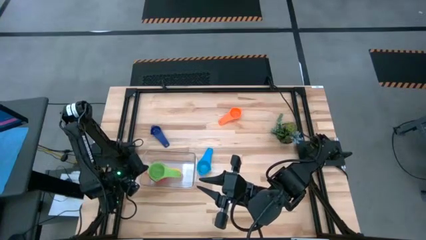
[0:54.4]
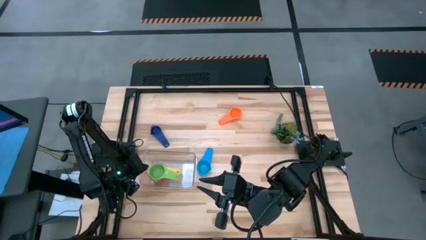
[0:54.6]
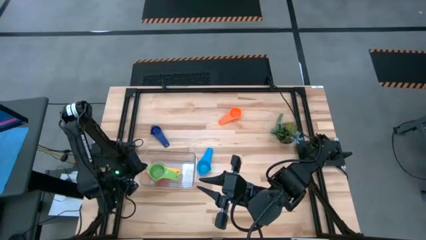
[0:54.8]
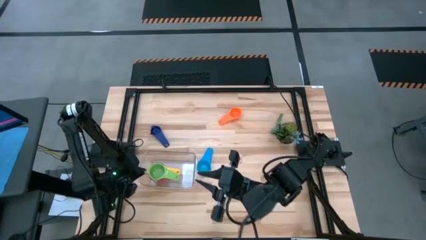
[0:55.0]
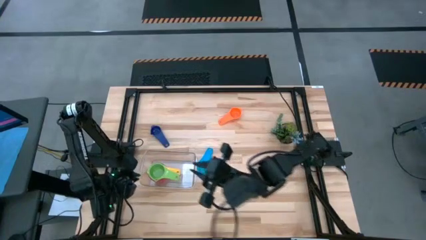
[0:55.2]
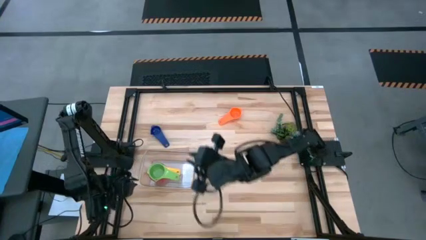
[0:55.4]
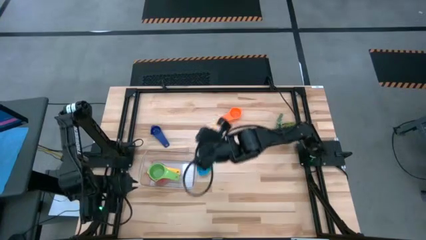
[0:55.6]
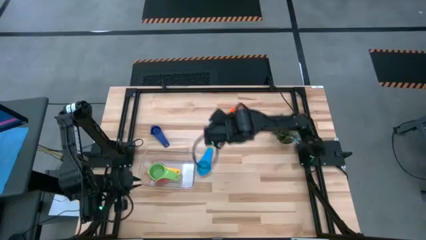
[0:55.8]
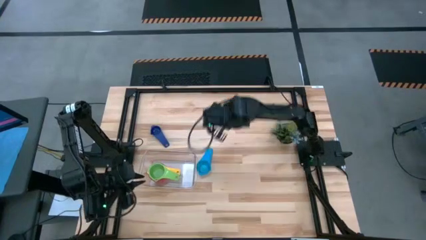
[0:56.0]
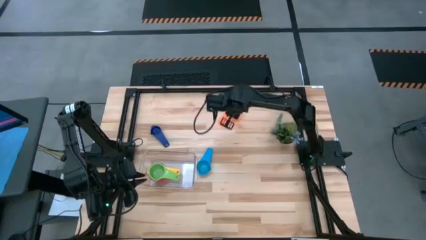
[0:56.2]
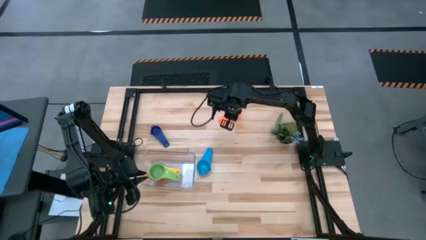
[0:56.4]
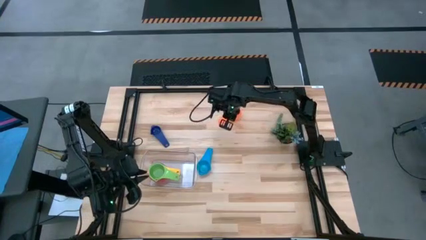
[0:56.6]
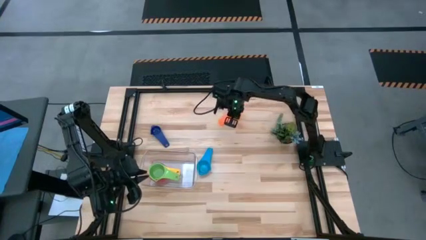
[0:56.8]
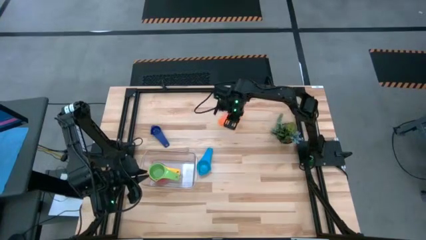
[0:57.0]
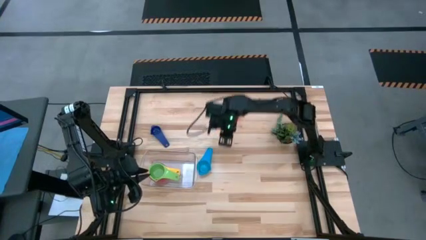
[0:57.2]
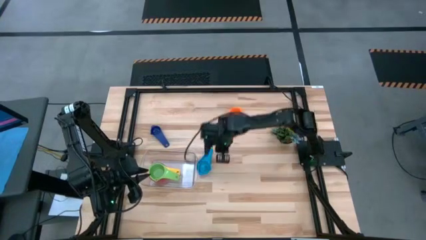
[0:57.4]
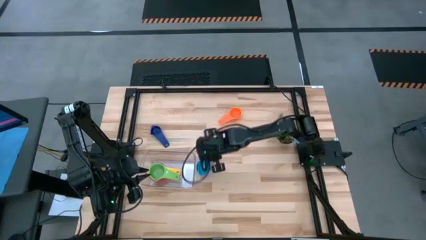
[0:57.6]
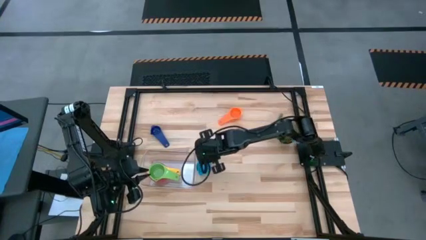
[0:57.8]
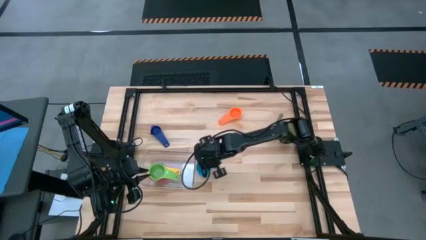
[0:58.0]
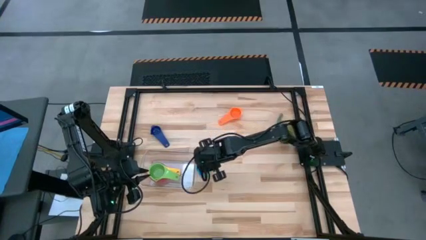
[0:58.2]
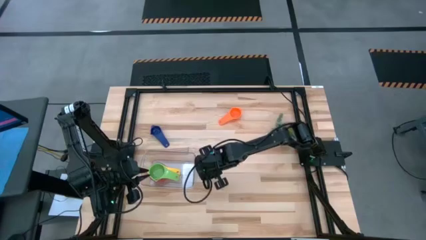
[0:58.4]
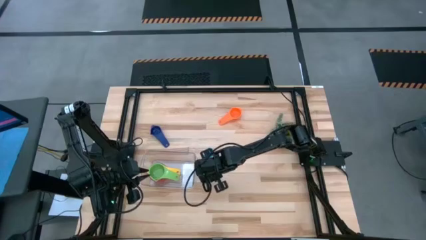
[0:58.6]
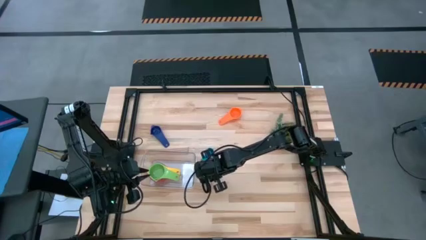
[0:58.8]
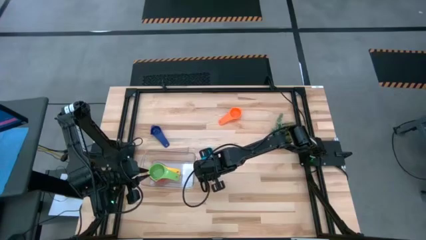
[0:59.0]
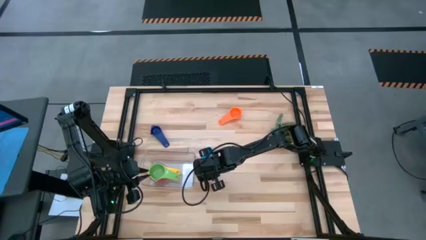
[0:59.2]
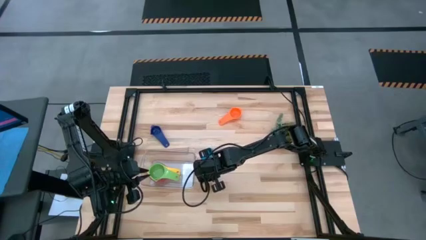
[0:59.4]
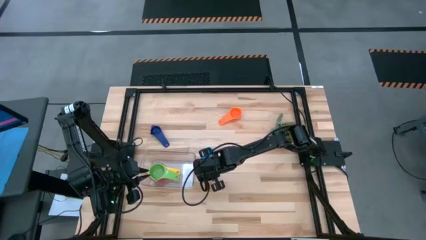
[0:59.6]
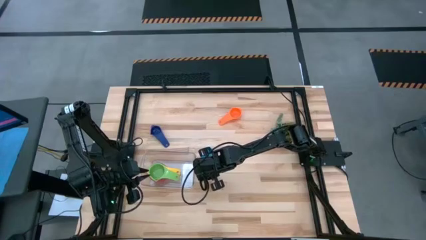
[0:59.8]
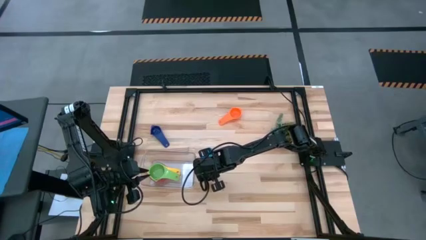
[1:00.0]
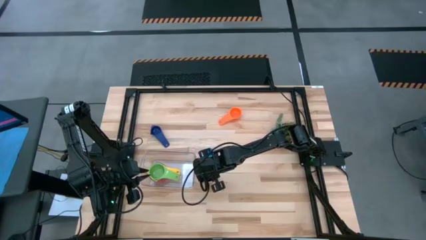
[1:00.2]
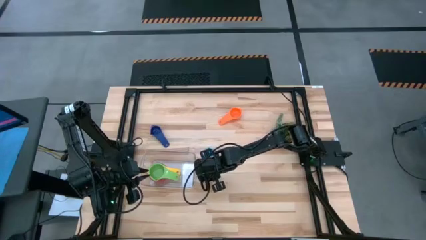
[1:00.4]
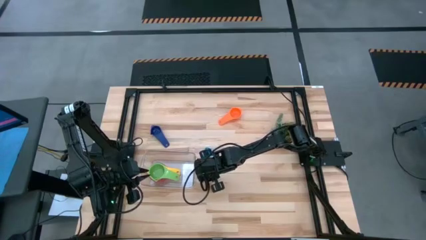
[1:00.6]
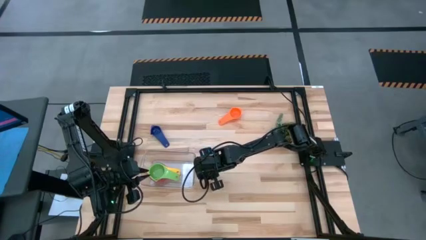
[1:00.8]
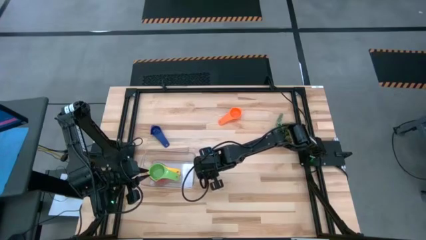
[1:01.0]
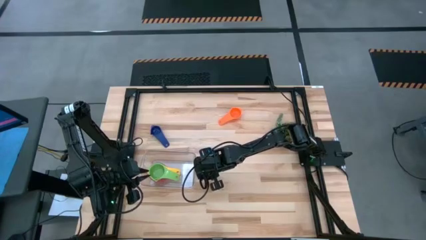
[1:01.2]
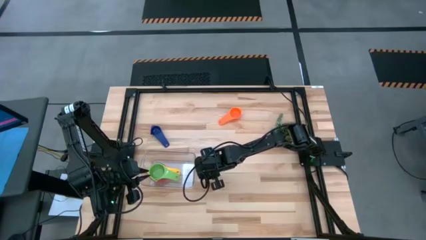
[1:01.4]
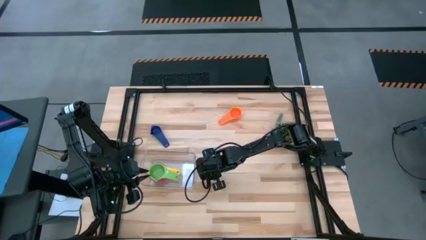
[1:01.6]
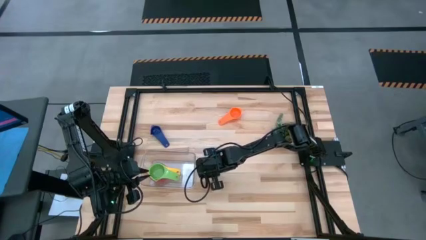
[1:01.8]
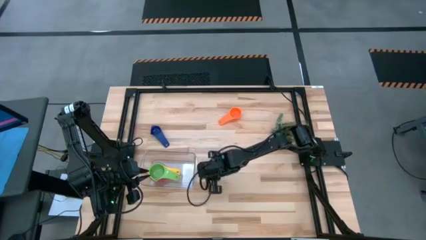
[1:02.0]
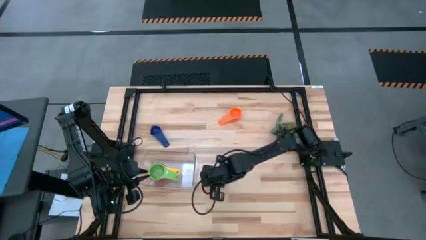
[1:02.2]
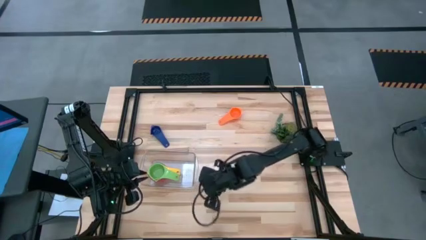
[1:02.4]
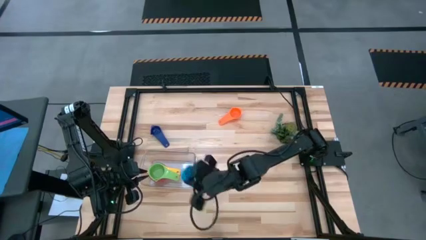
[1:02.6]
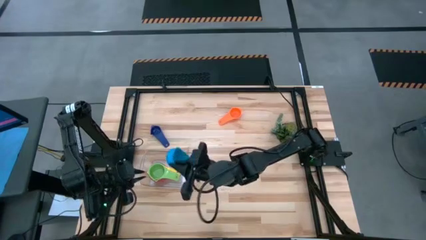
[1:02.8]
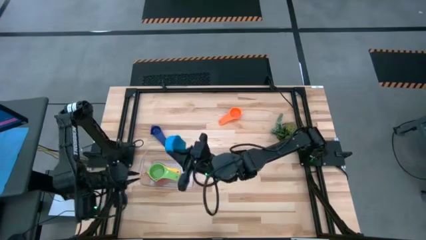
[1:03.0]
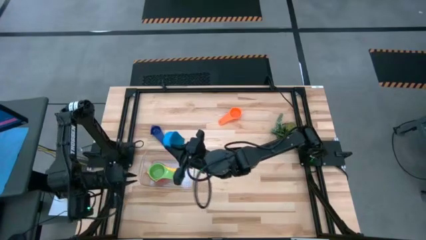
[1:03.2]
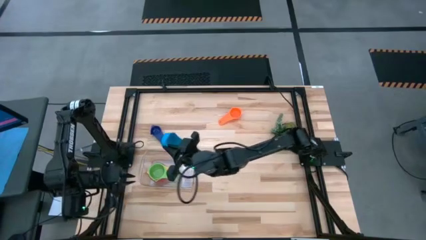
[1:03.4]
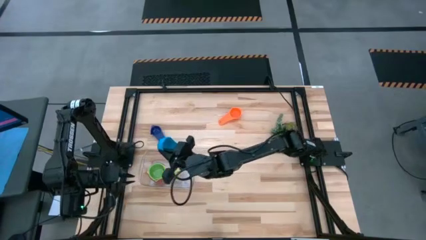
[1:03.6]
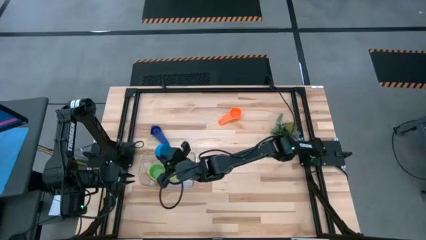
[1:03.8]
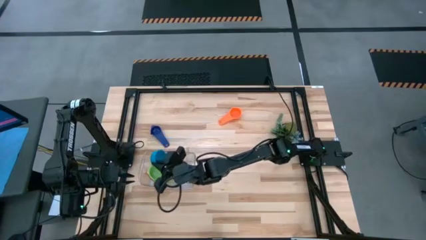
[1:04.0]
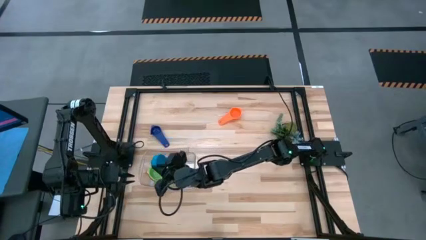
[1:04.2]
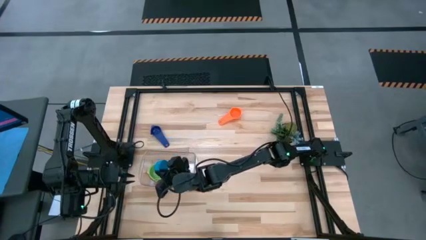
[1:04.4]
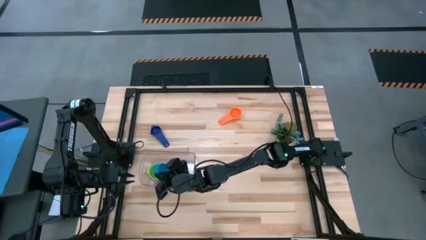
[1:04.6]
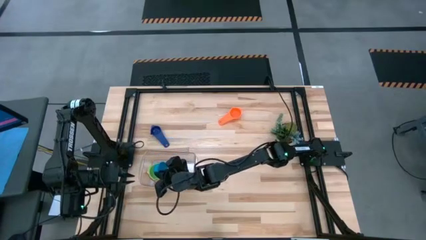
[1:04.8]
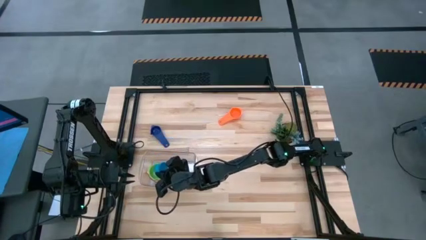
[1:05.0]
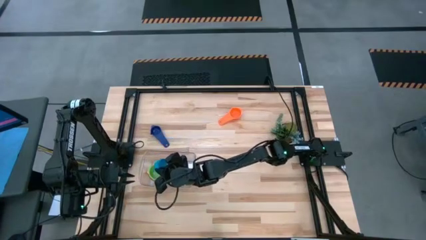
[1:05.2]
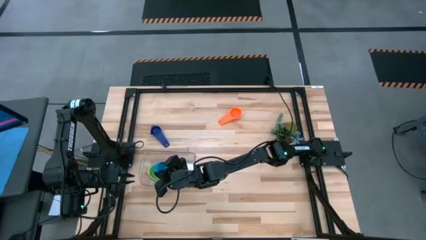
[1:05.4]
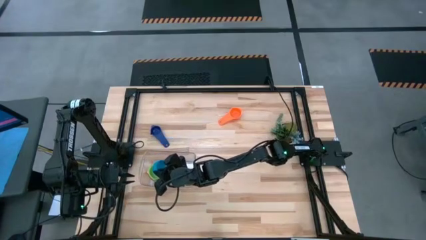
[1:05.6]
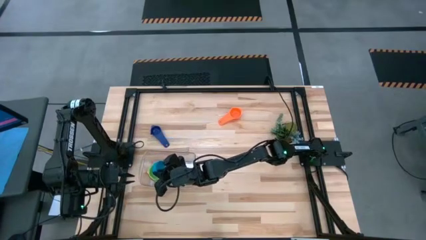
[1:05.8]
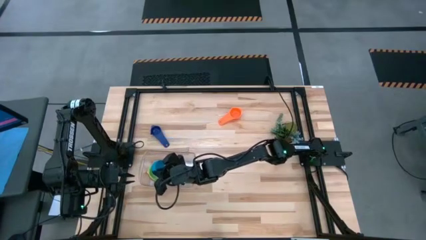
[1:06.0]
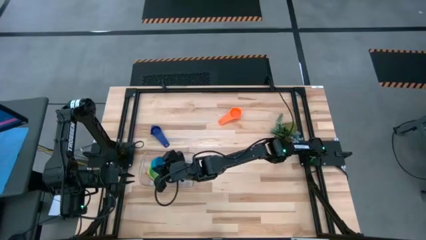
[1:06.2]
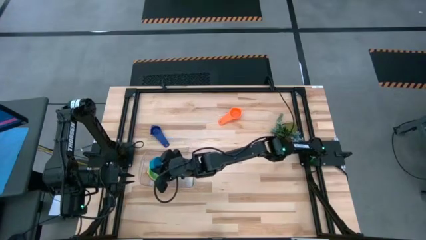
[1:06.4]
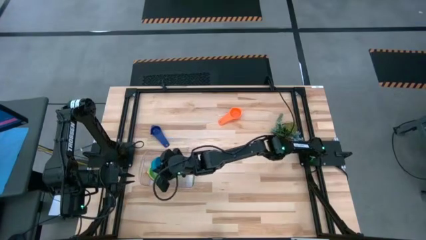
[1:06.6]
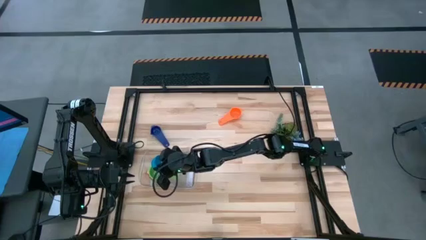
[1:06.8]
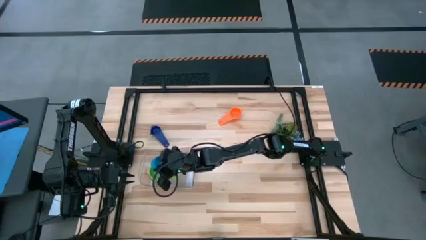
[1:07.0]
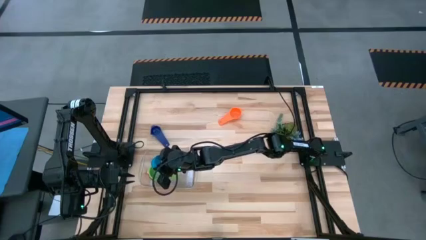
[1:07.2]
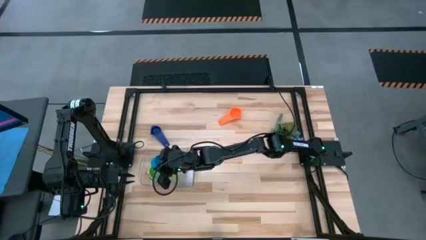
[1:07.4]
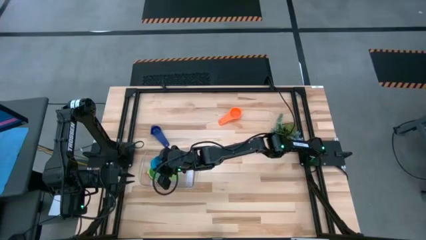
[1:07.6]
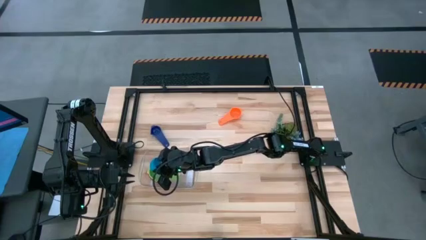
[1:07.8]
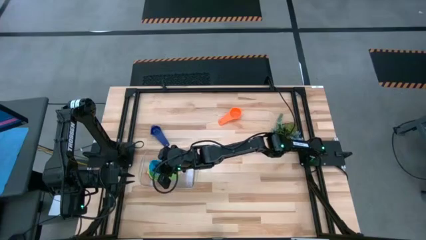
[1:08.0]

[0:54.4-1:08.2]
Task: Nest measuring cups in basket
Stack the light blue measuring cup on the green measuring cup in the transparent bin
